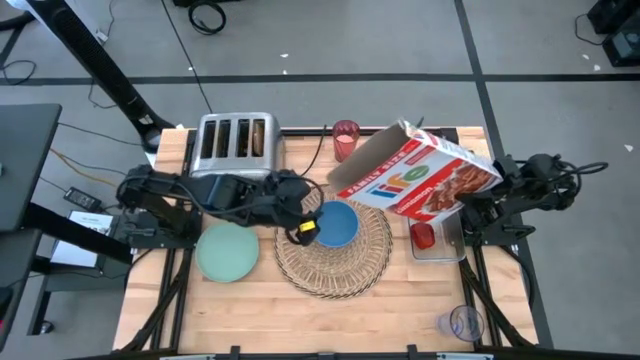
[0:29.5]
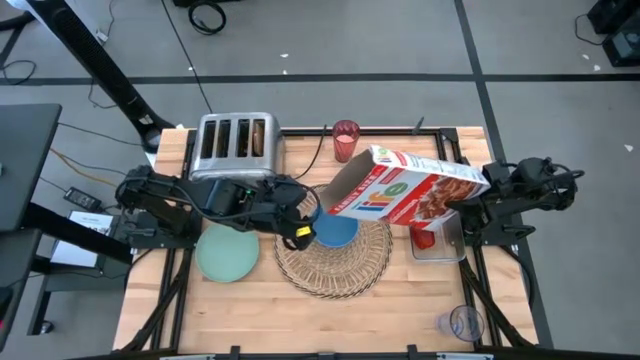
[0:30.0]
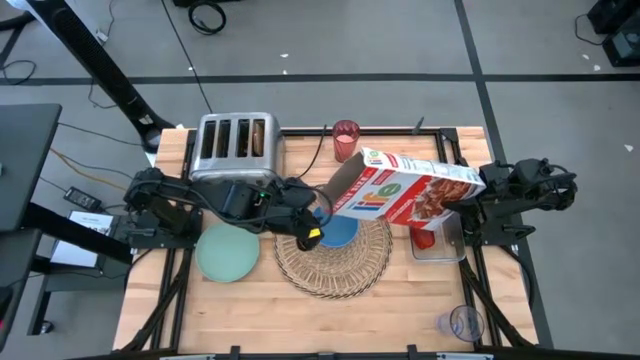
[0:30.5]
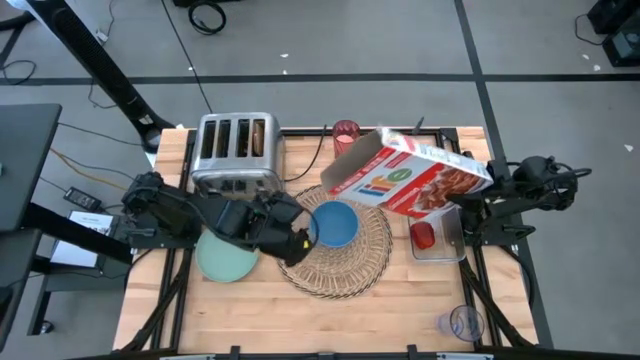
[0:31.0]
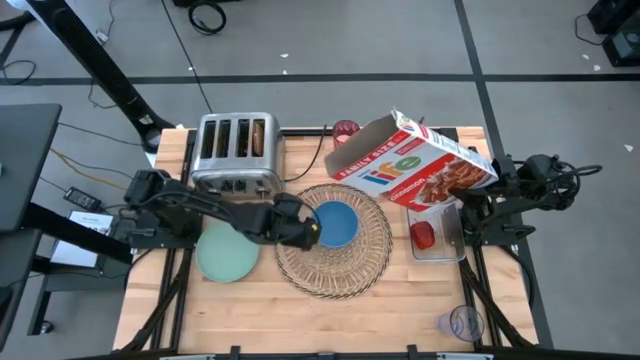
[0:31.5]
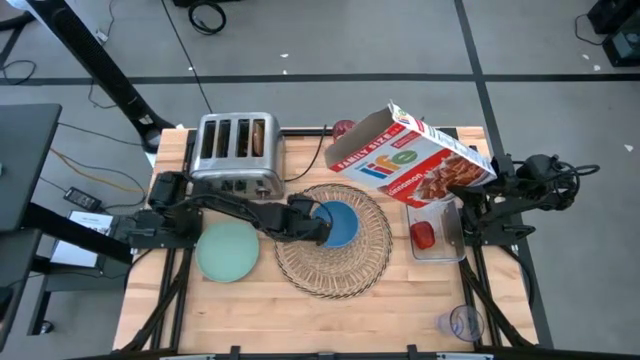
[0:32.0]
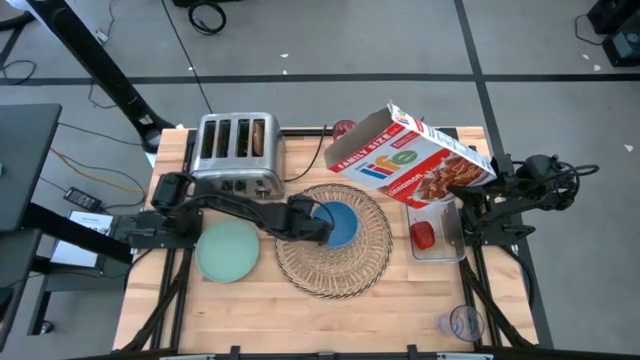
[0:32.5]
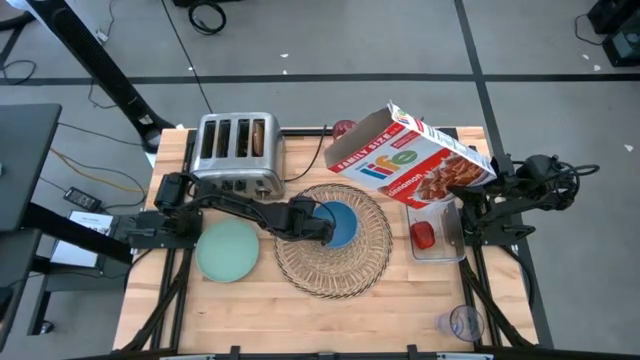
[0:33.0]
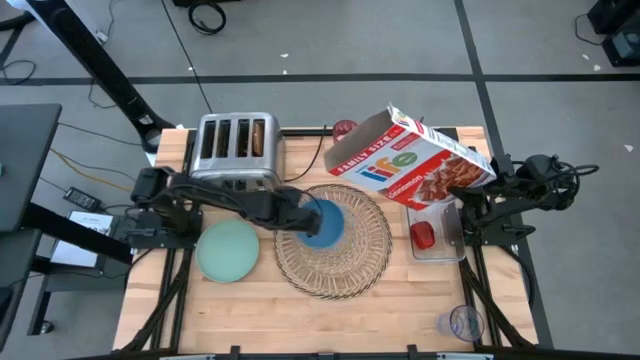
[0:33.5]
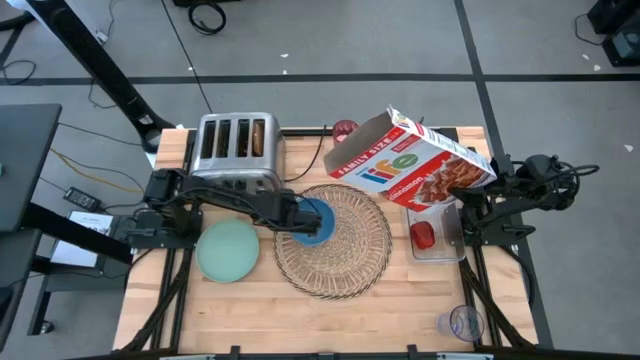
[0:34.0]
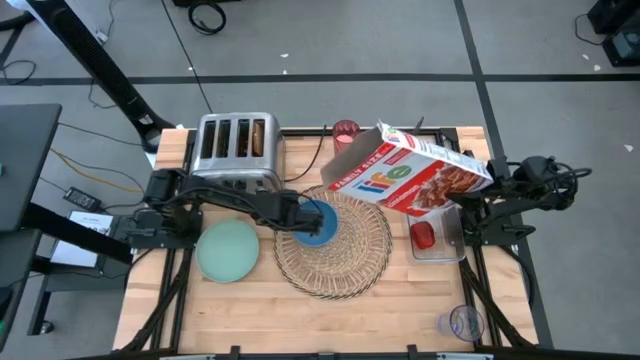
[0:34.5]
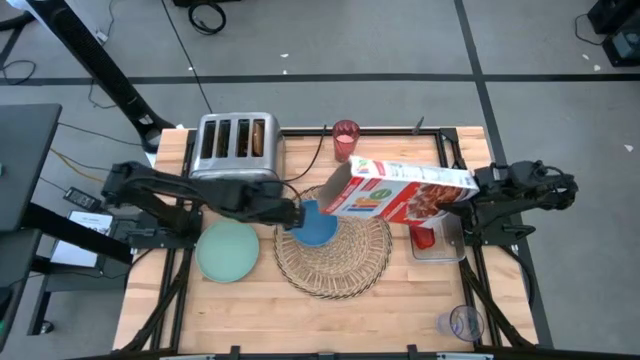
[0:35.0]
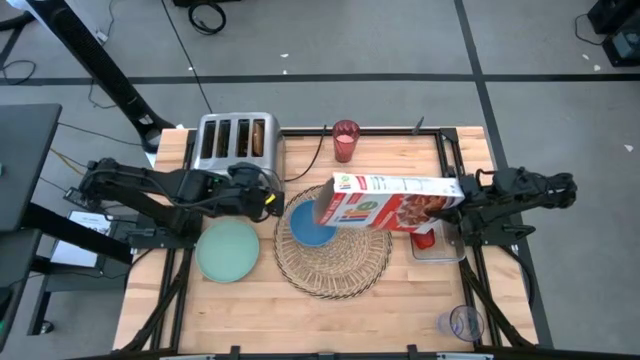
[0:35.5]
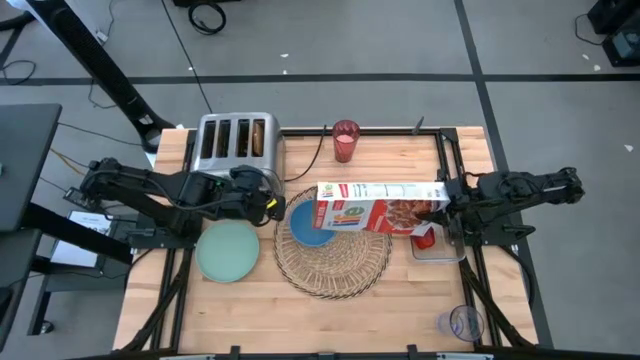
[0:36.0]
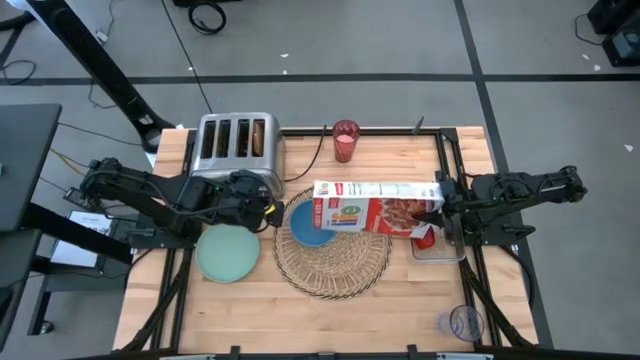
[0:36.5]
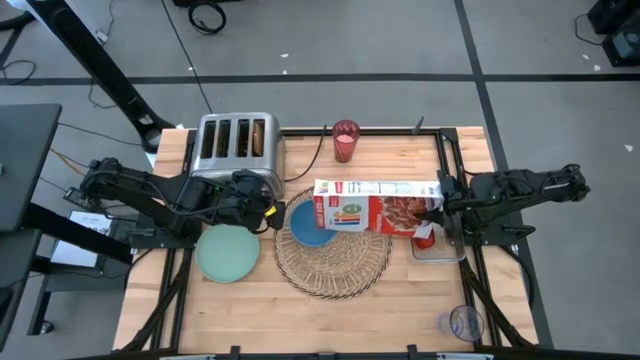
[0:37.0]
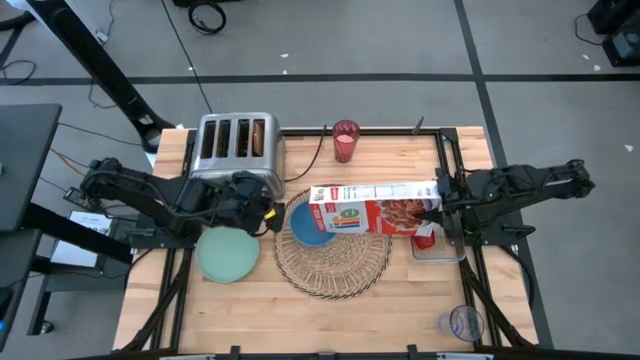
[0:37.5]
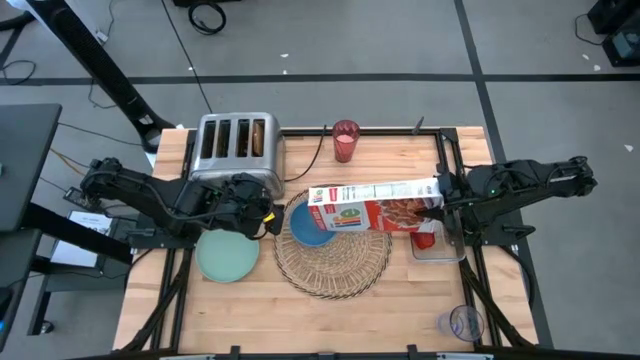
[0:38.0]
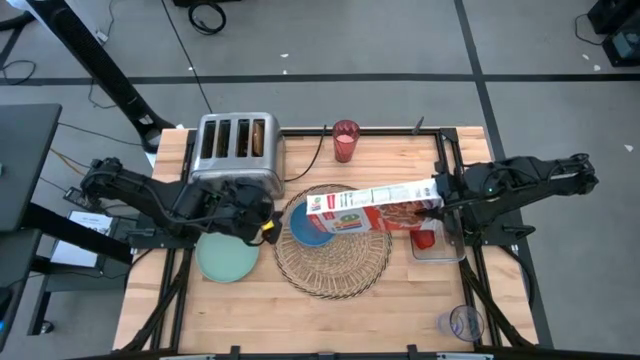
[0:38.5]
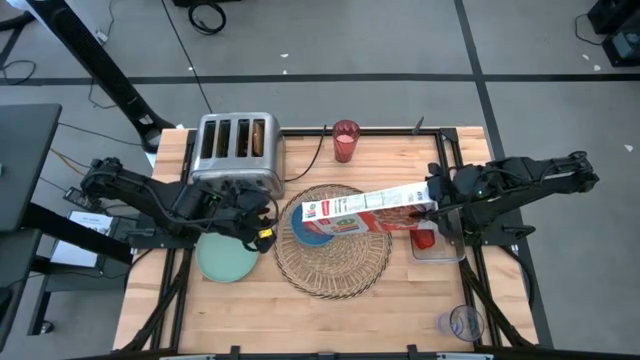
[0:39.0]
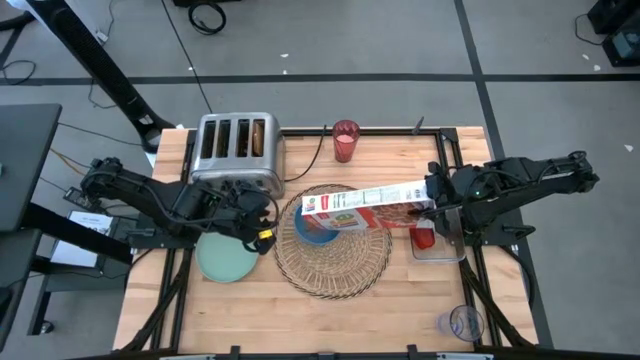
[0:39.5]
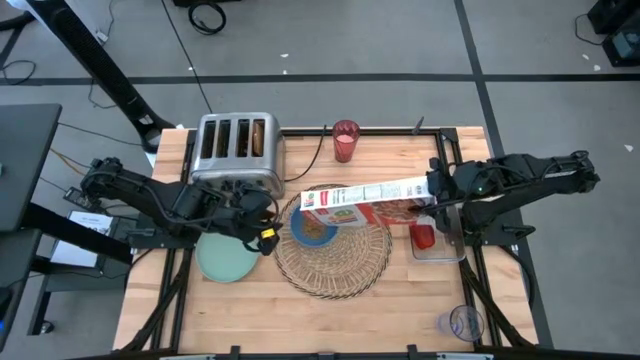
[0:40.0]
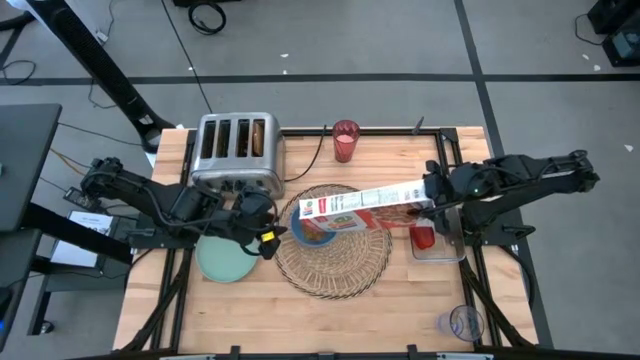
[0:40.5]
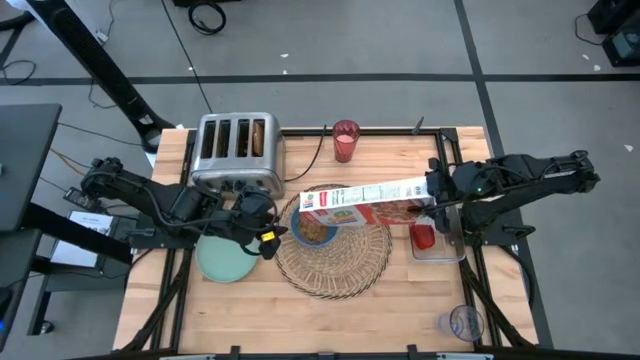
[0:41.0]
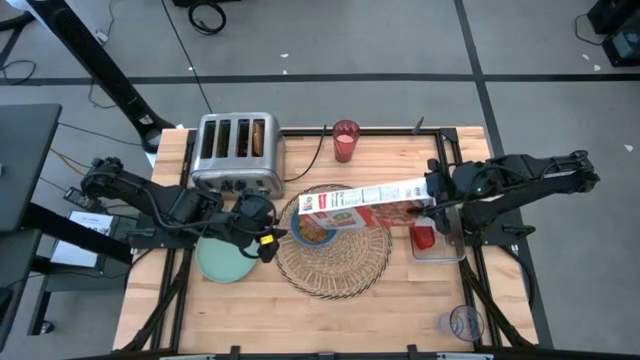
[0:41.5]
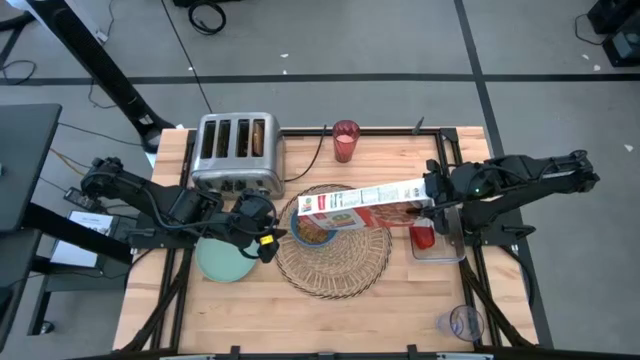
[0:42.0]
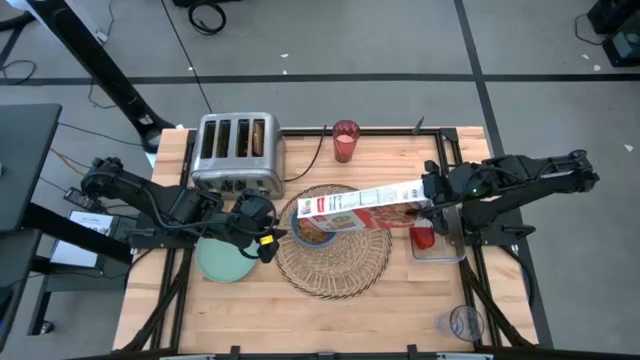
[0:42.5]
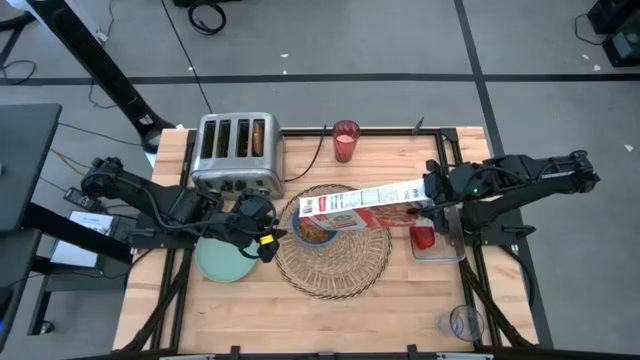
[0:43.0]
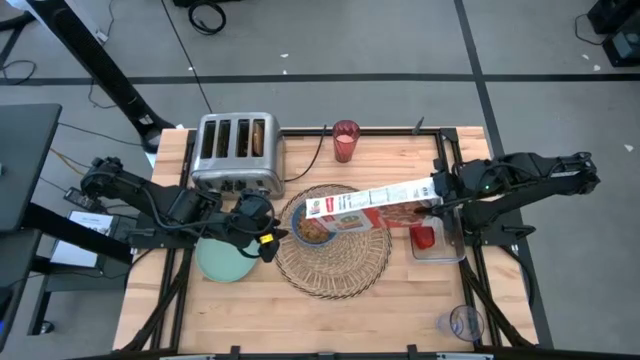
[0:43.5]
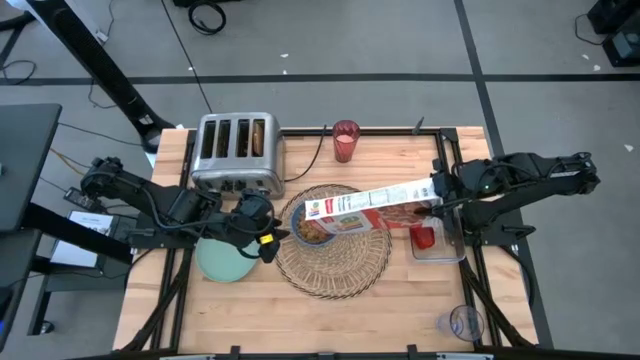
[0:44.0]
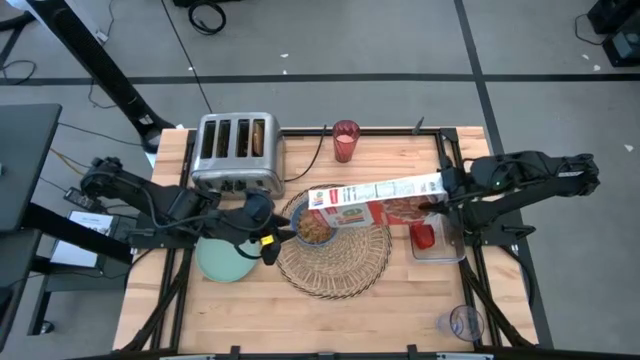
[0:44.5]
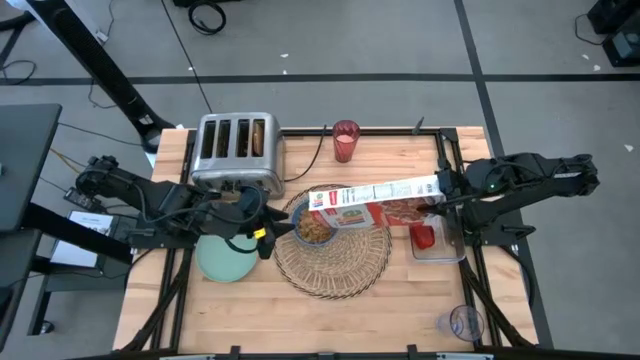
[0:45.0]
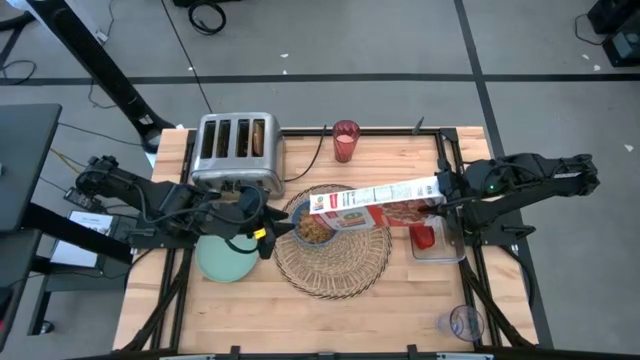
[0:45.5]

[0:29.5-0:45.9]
Task: Arrange a breakfast setting
Pour the cereal into the bowl

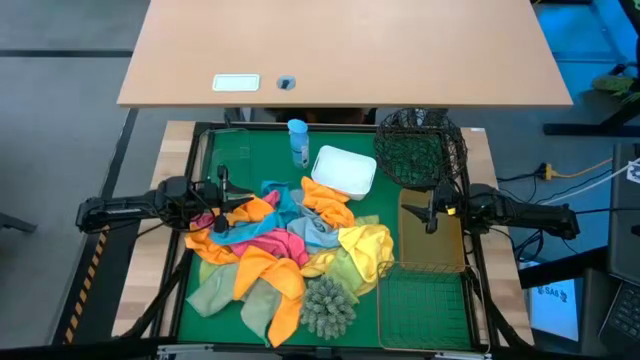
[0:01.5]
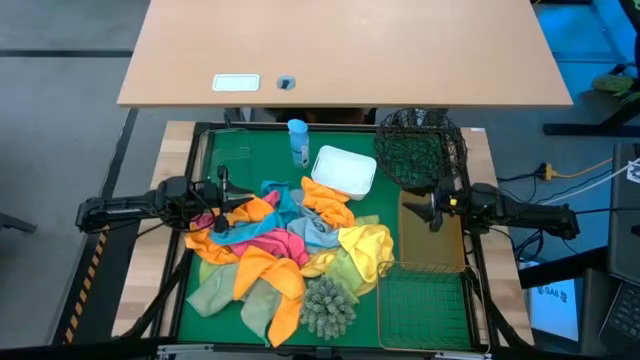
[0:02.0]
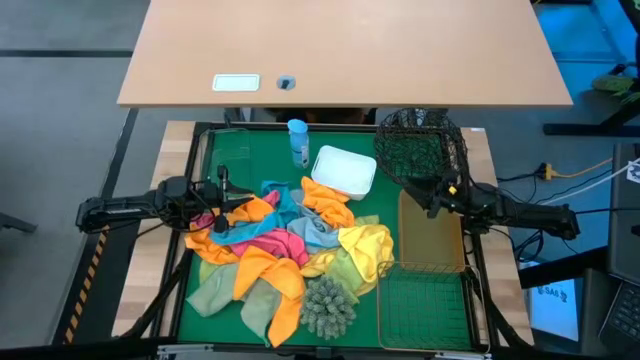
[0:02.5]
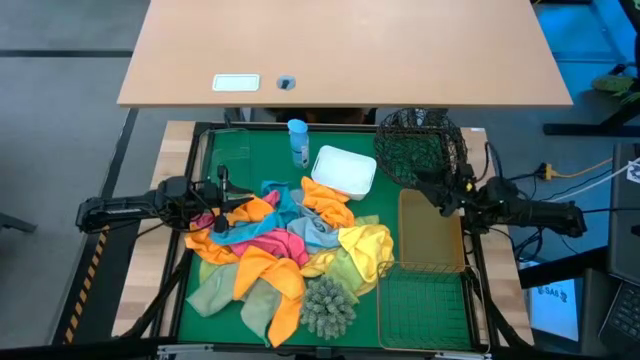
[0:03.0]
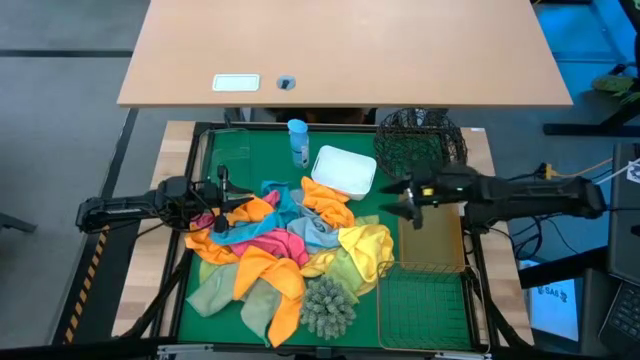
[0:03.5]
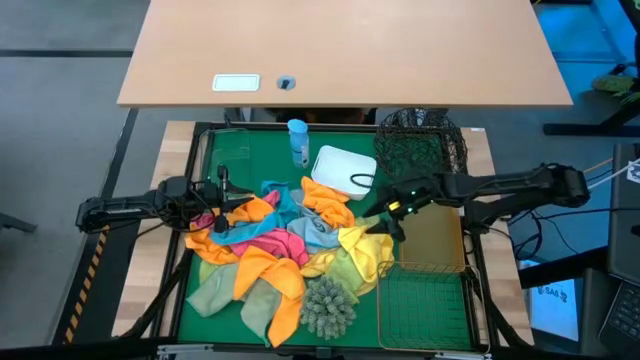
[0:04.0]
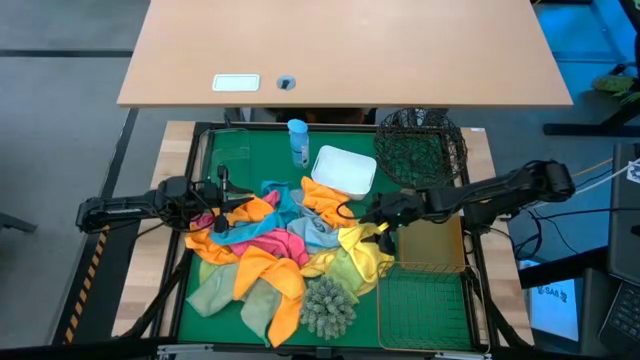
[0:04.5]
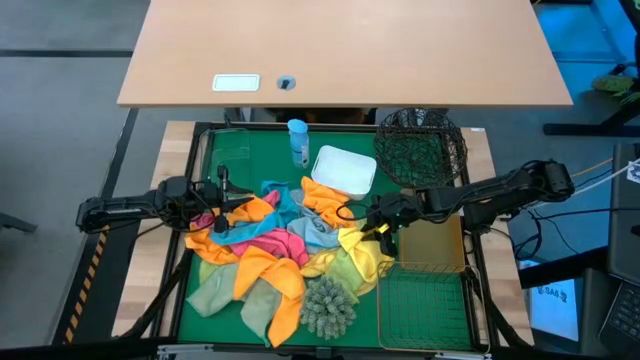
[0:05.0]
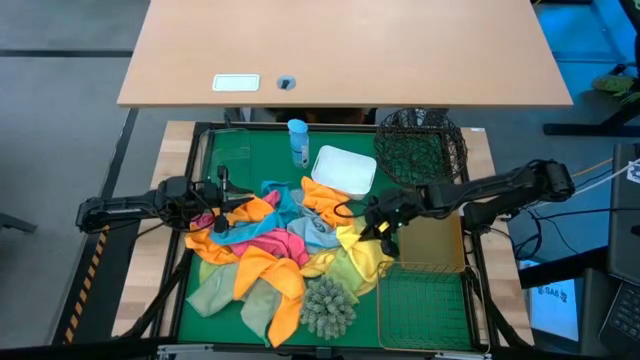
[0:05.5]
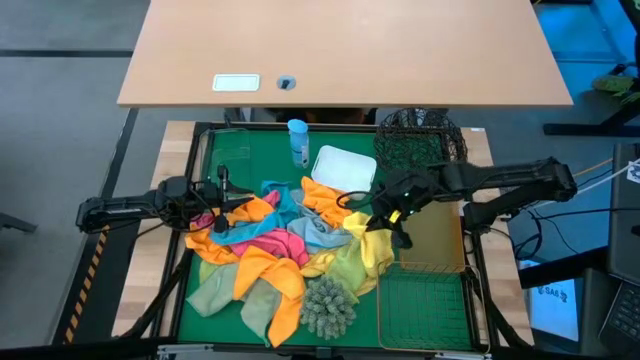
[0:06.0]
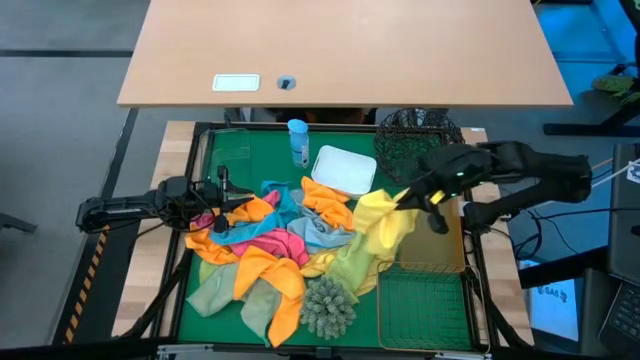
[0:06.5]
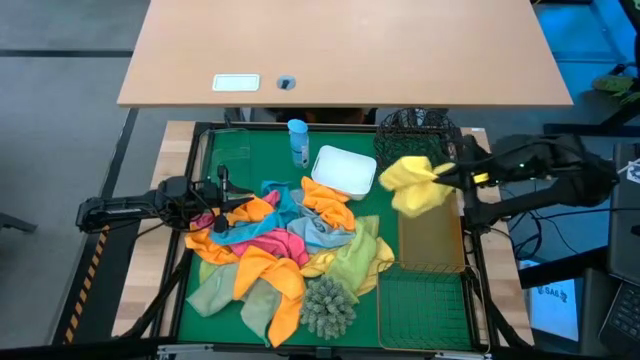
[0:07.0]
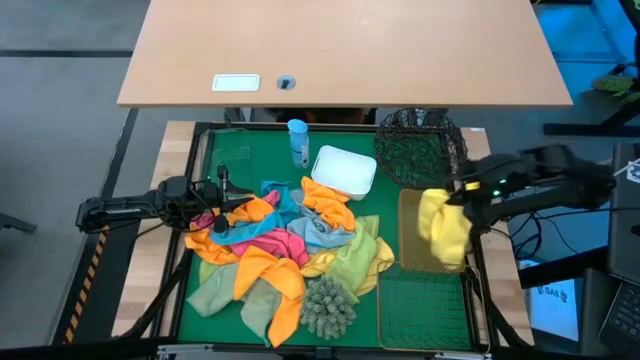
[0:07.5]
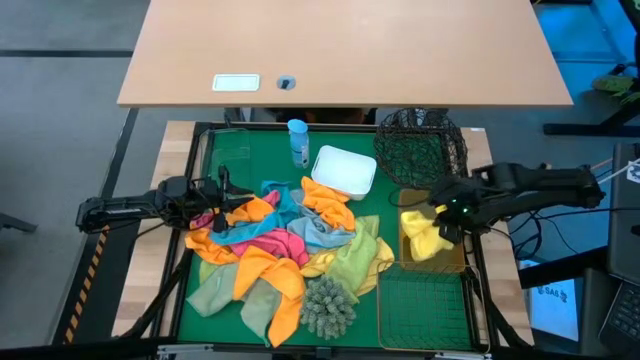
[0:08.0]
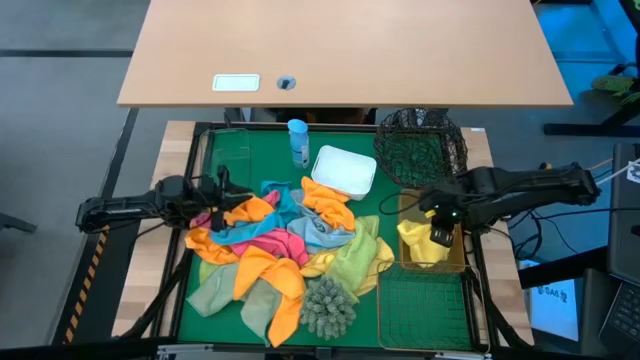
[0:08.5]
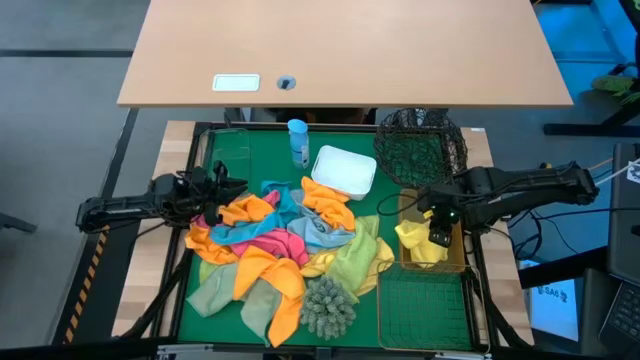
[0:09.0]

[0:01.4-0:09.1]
Task: Sort microfiber towel by color & place in baskets
Put the yellow microfiber towel into the yellow bin
